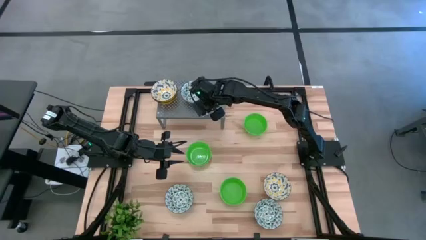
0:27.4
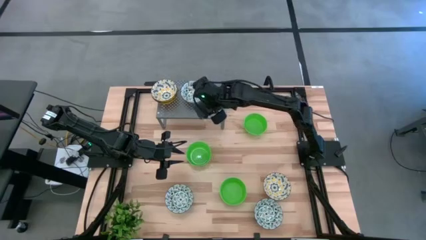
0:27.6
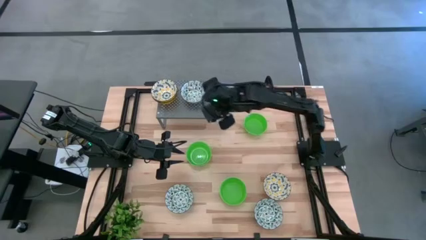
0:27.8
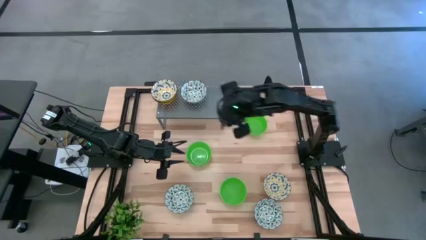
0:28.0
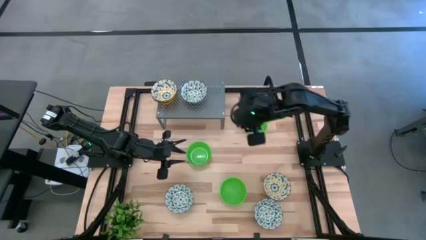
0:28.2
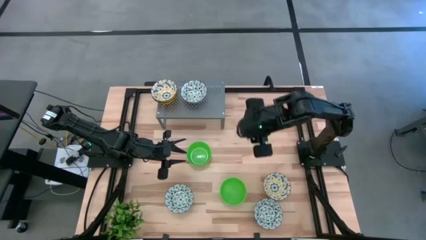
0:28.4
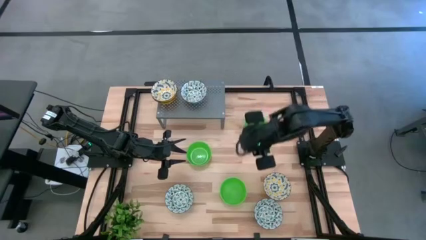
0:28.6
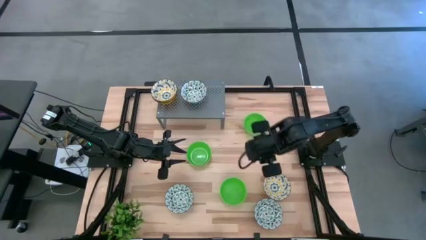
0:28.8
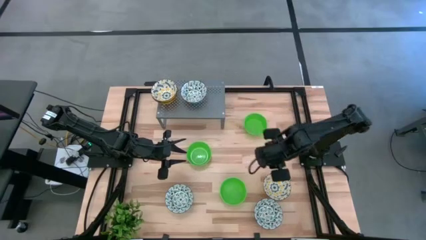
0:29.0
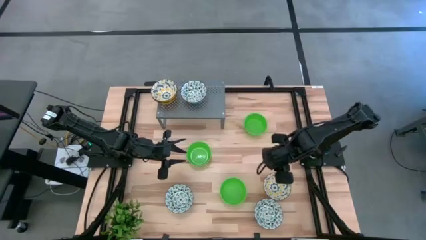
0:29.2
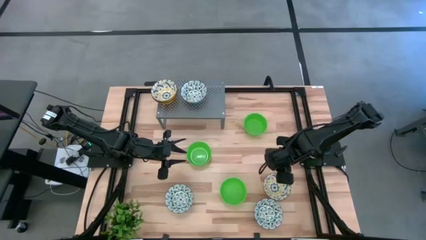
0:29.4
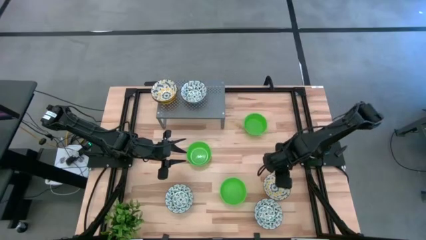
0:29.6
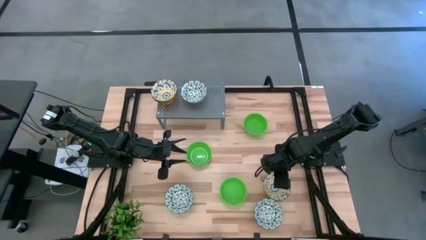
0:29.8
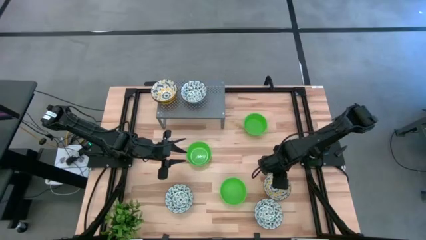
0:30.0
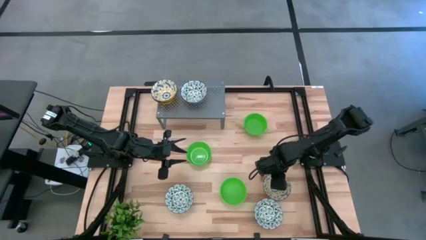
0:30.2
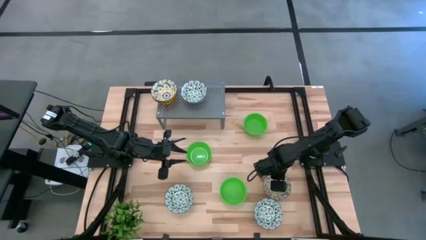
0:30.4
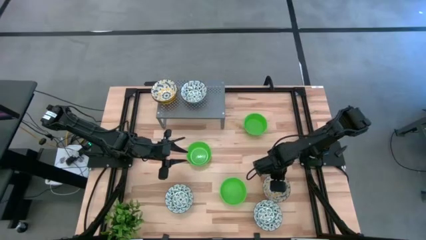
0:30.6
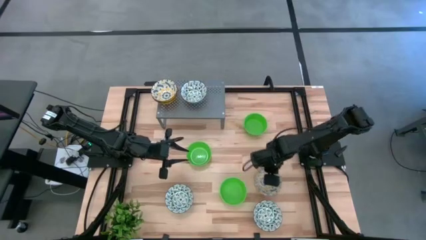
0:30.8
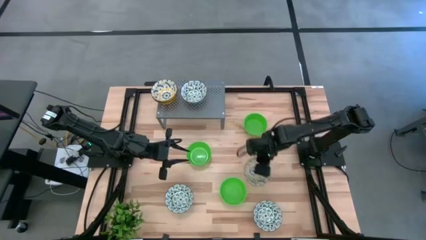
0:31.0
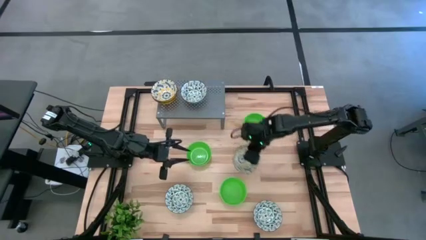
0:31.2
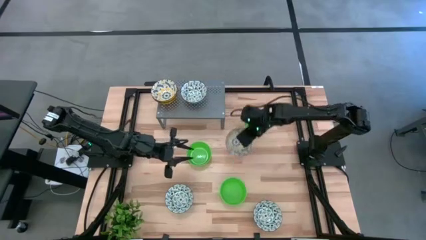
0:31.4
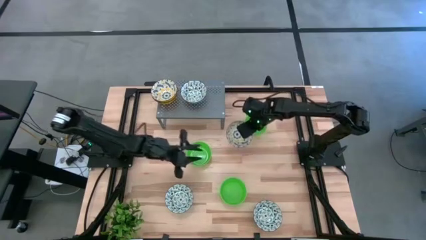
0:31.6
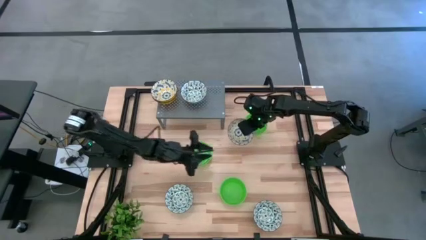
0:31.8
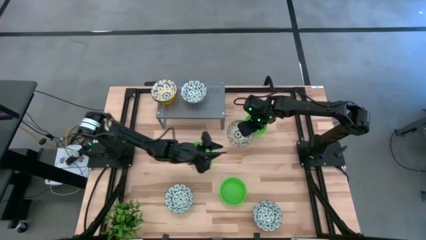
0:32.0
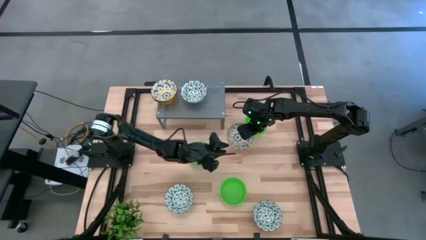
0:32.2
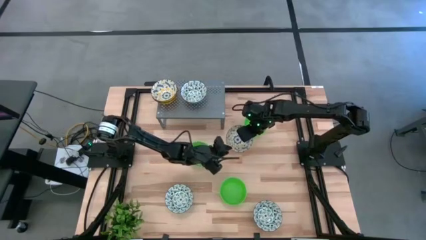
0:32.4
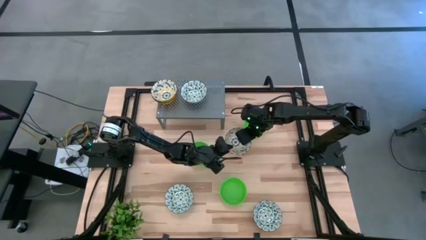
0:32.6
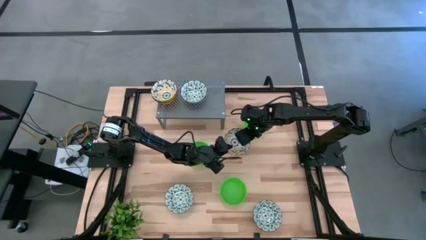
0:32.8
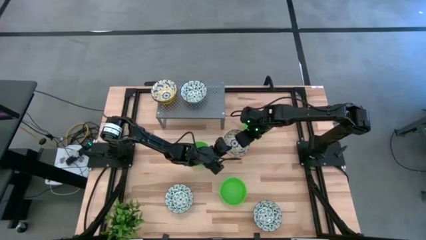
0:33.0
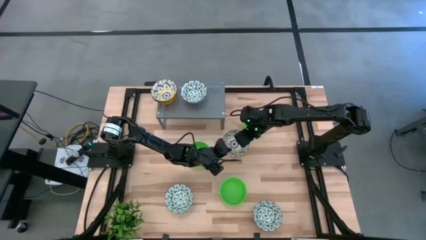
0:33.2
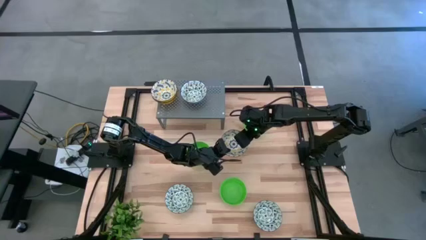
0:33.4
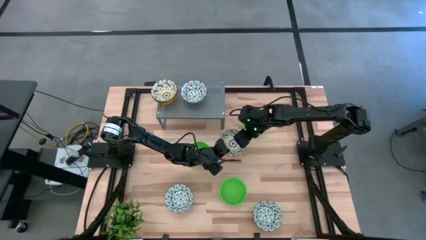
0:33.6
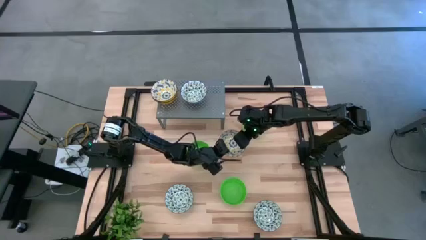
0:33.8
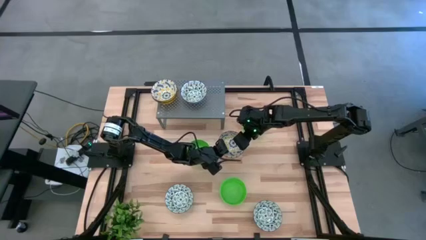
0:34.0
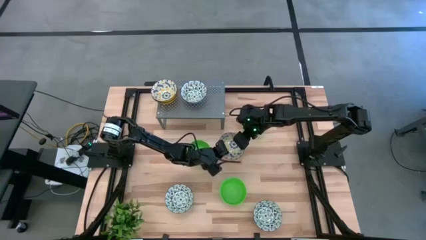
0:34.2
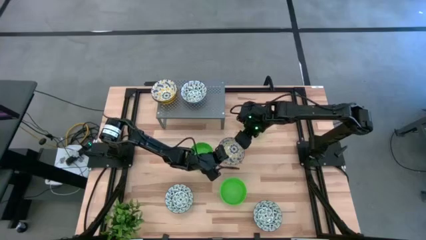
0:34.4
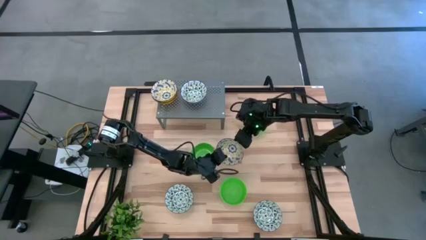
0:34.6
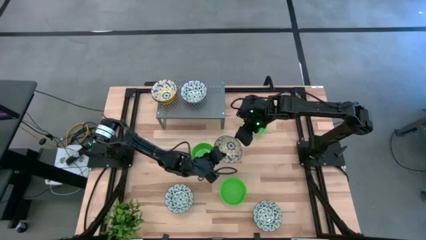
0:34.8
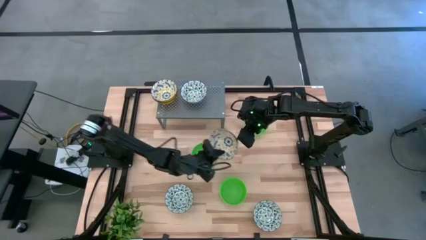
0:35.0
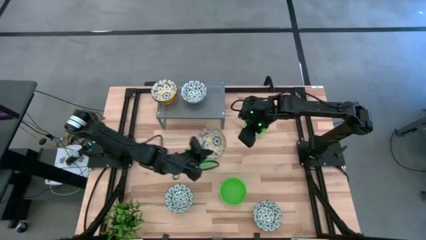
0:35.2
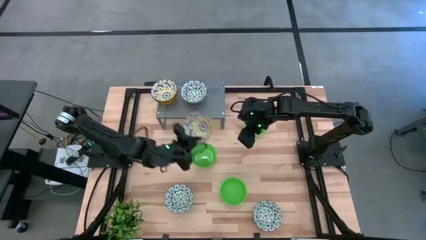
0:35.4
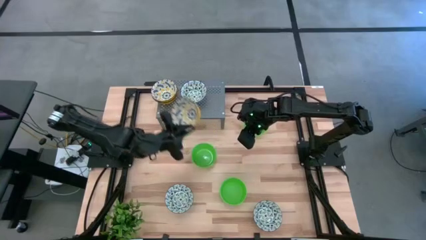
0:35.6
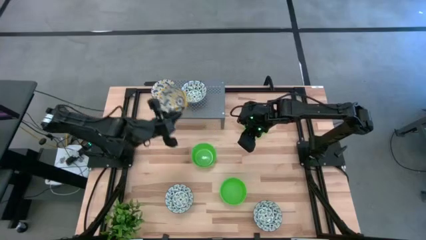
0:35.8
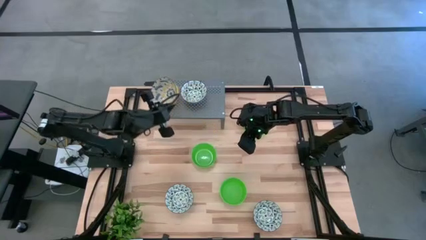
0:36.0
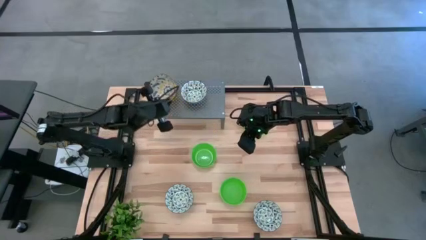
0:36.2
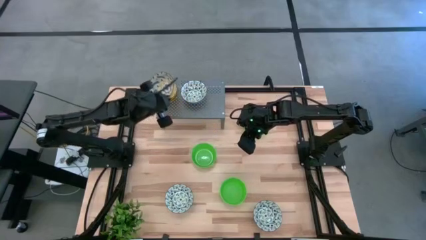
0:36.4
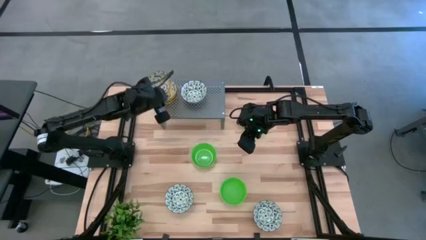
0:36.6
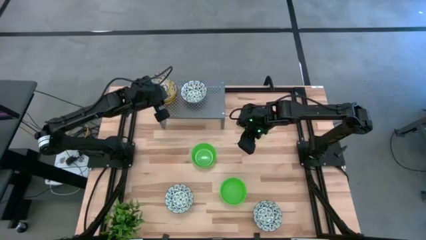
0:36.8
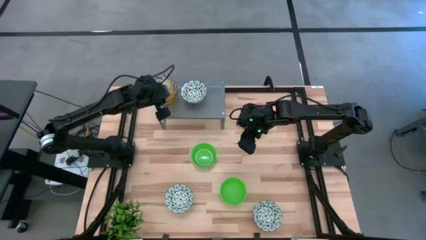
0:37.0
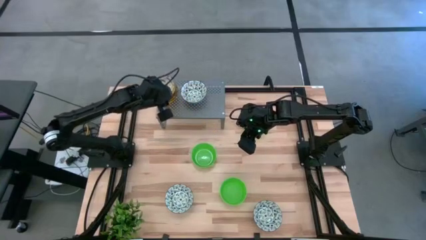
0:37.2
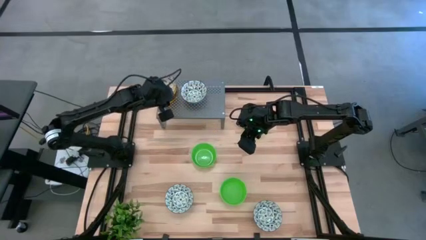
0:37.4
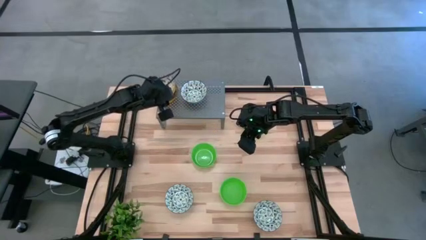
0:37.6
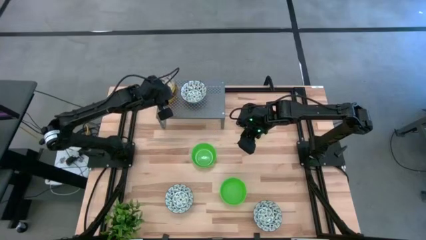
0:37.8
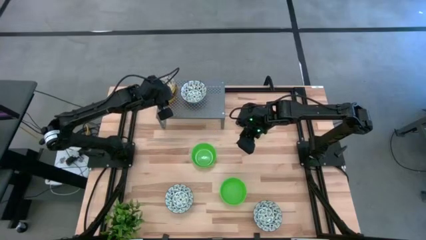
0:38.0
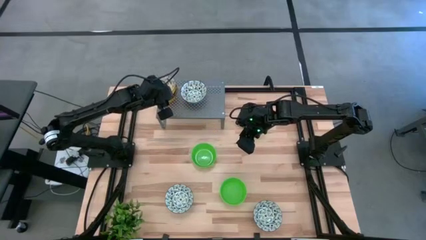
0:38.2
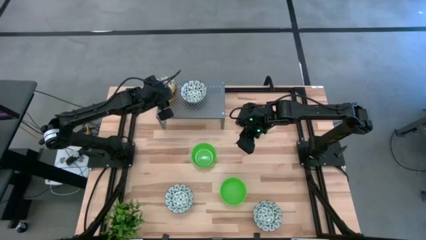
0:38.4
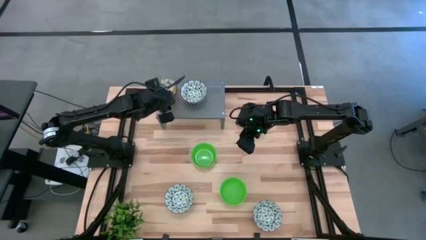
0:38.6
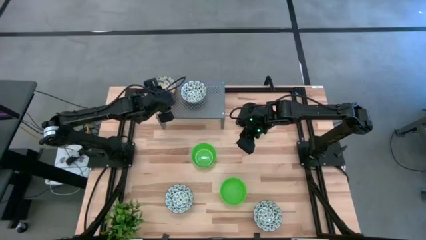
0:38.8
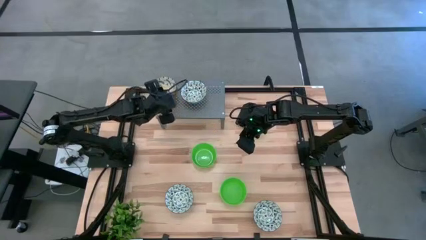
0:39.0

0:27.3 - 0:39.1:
Task: Pick & Place Mini bowls
Stack the yellow patterned bowl on the yellow patterned bowl on the shelf

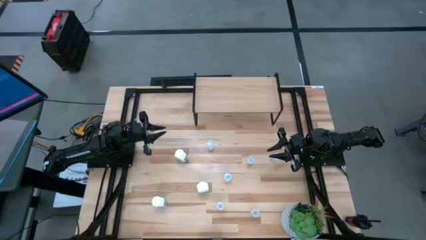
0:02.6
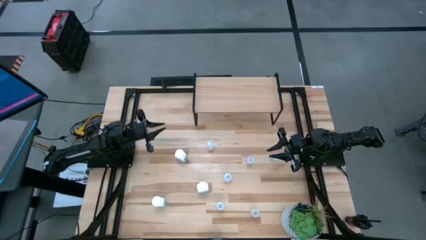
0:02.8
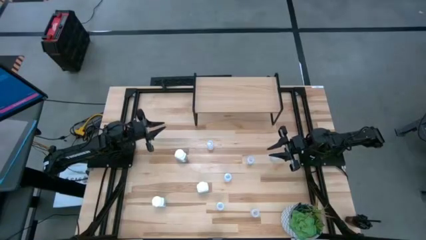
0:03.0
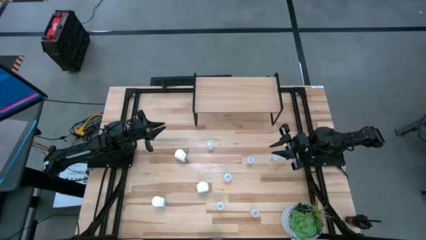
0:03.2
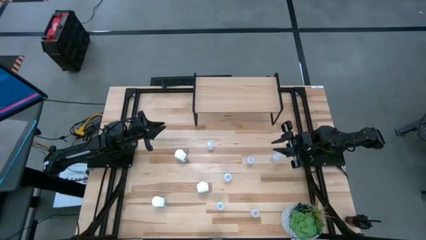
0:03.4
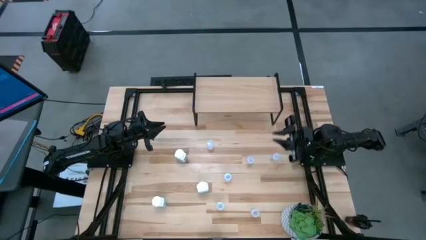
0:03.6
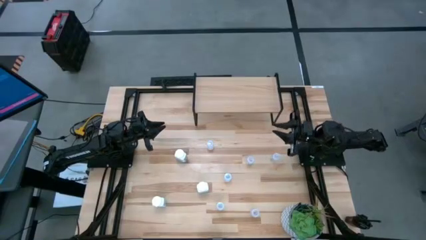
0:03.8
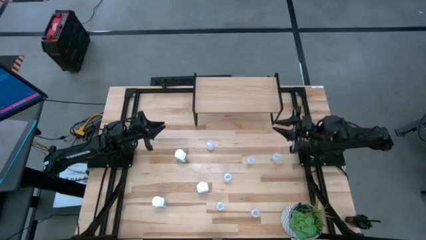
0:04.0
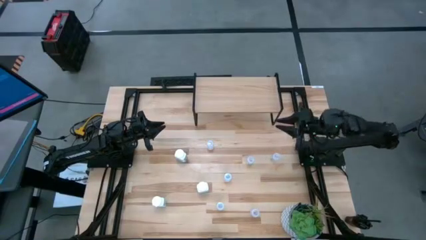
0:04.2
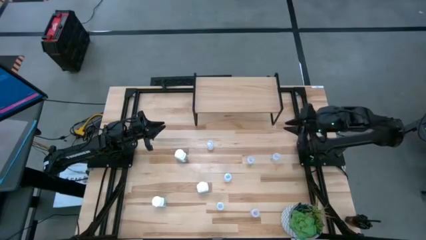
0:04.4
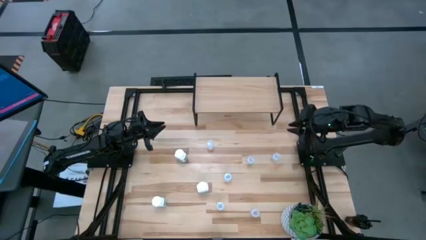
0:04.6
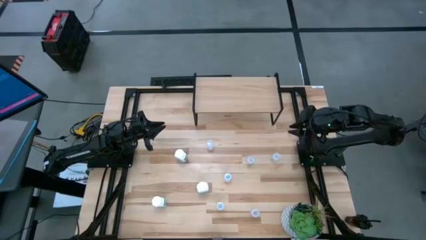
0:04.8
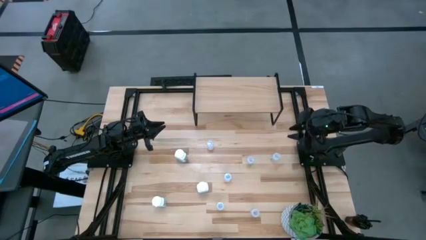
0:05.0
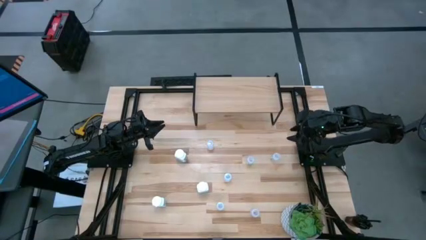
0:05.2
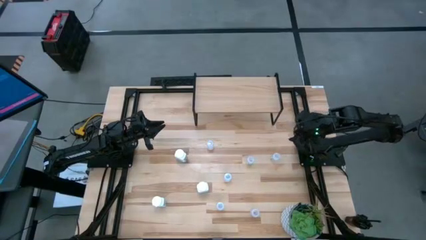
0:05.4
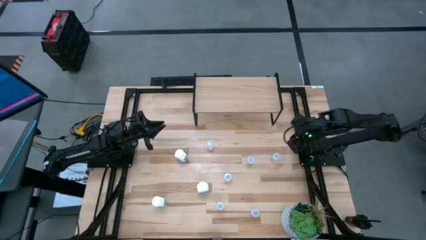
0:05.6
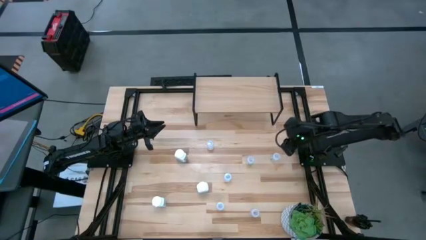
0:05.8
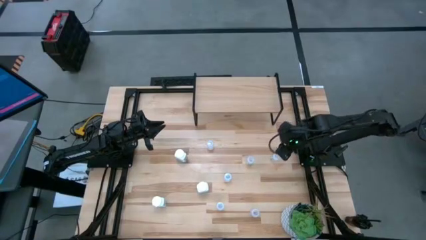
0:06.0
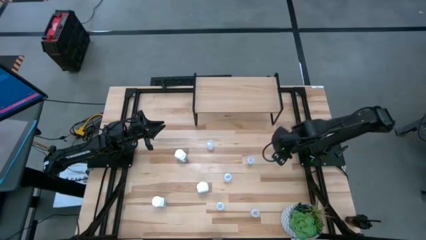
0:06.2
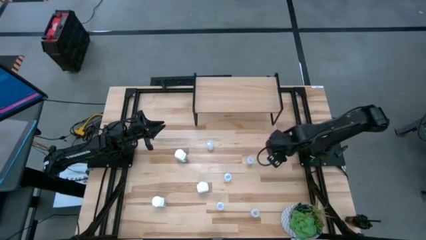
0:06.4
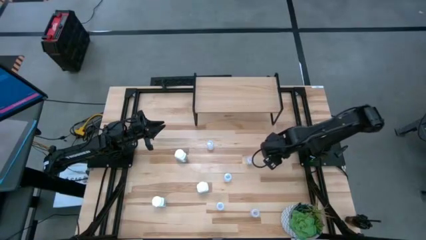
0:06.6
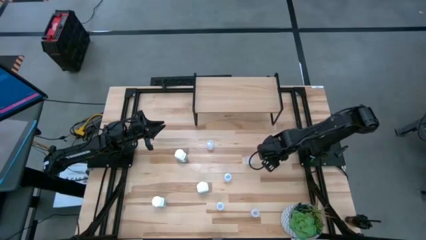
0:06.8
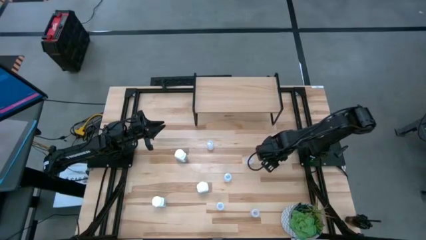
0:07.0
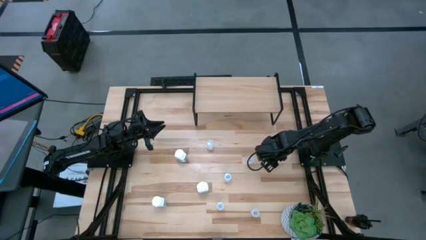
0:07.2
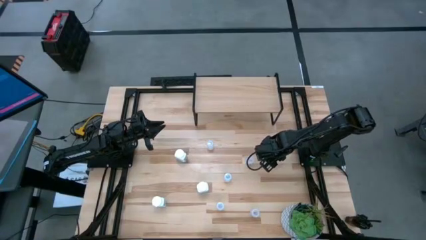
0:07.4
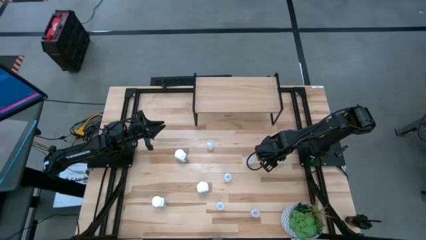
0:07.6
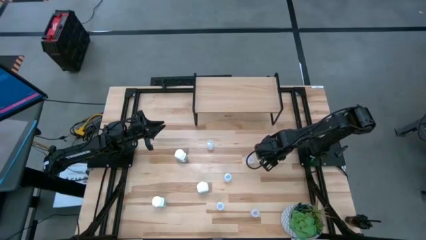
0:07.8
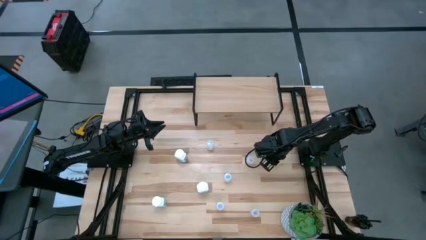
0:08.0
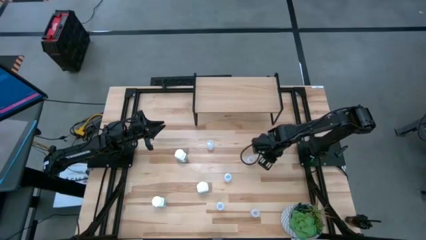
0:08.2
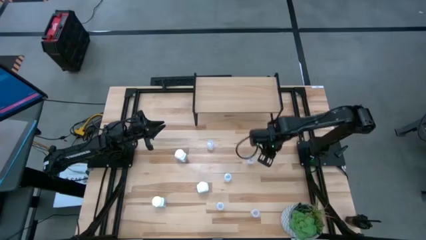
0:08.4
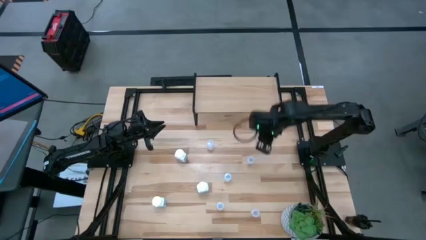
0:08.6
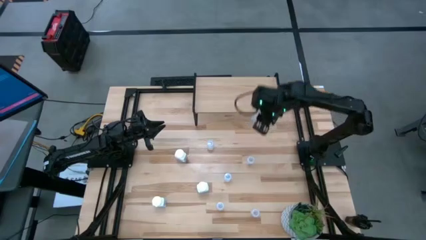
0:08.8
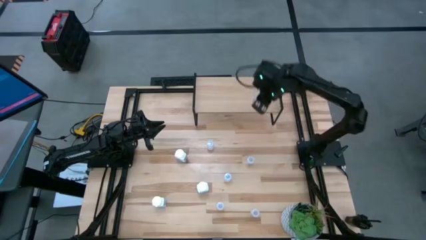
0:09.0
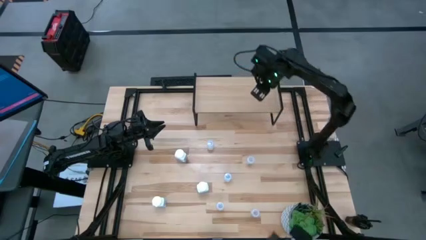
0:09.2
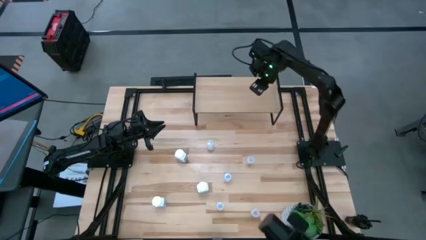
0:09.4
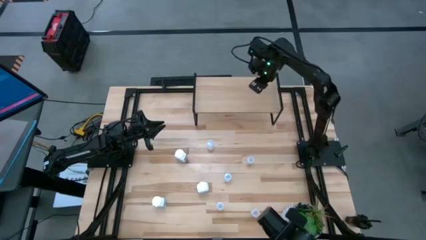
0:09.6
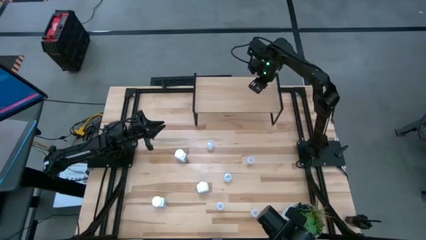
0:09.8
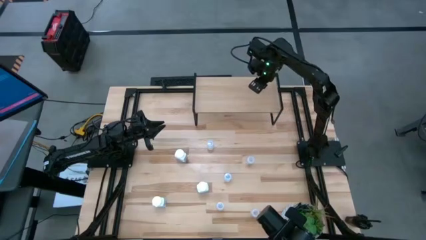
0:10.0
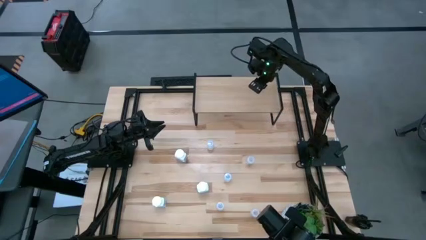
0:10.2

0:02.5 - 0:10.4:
Task: Pick and place medicine bottles onto shelf by color
Put the top right transparent pill bottle on the shelf
